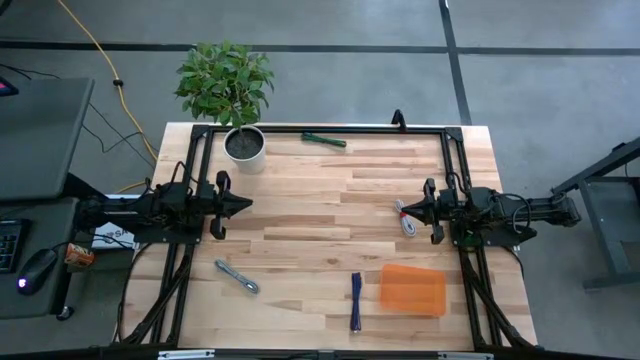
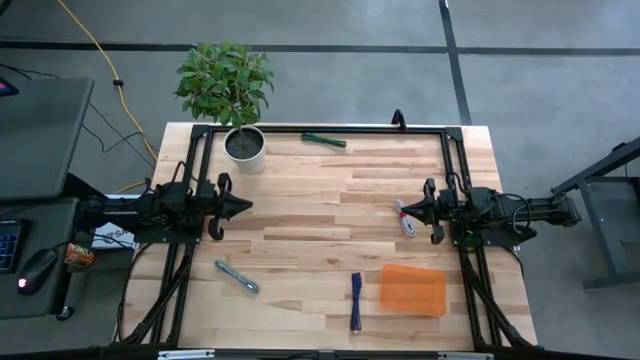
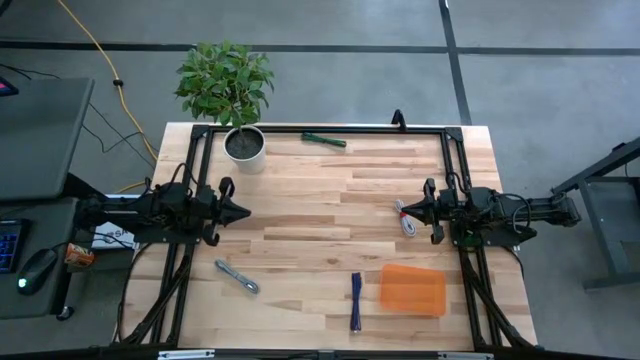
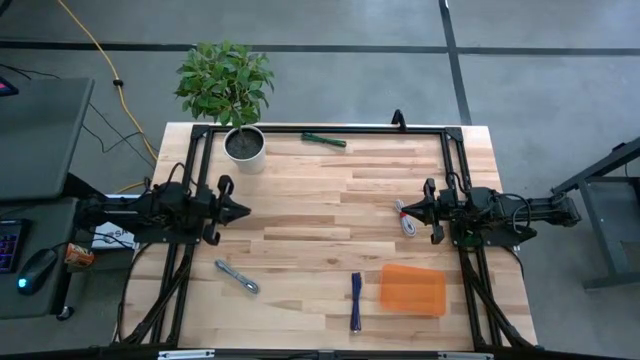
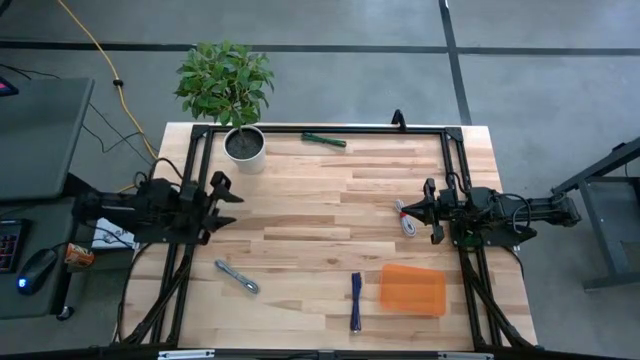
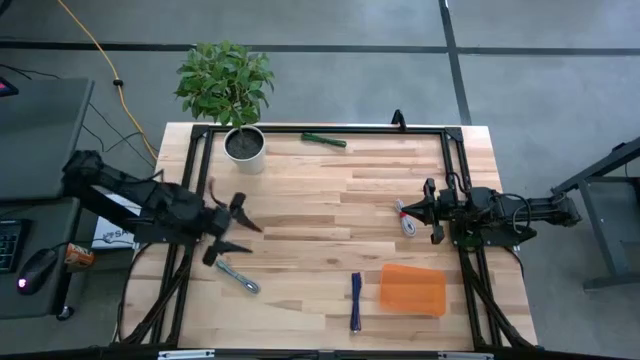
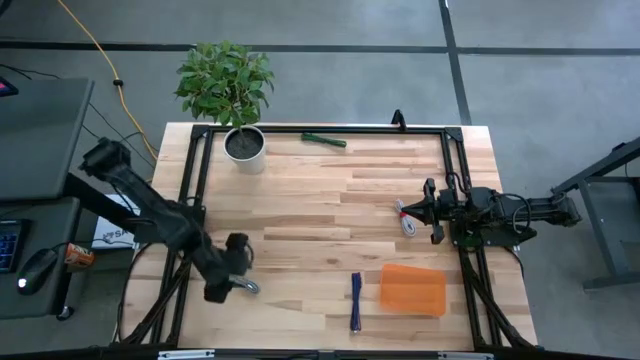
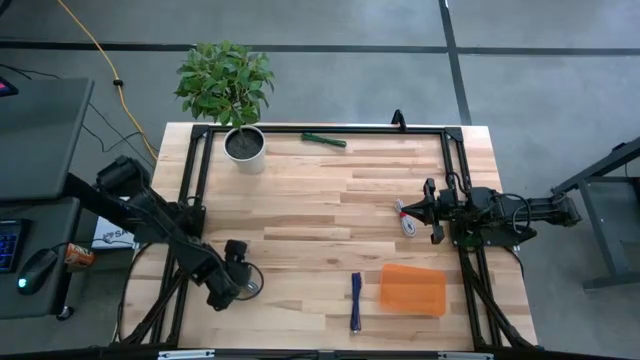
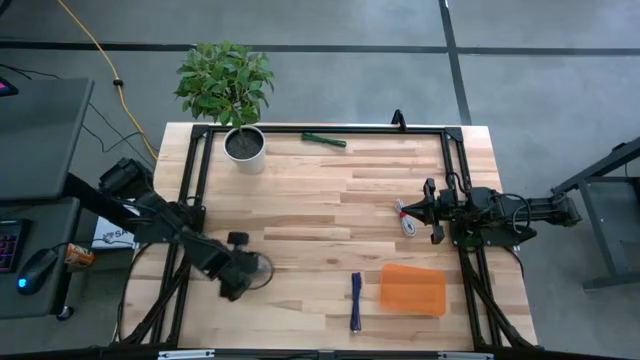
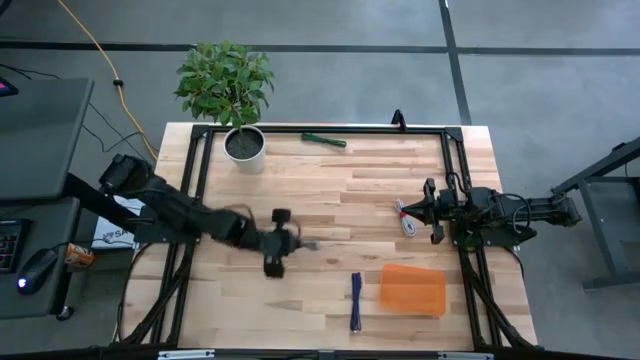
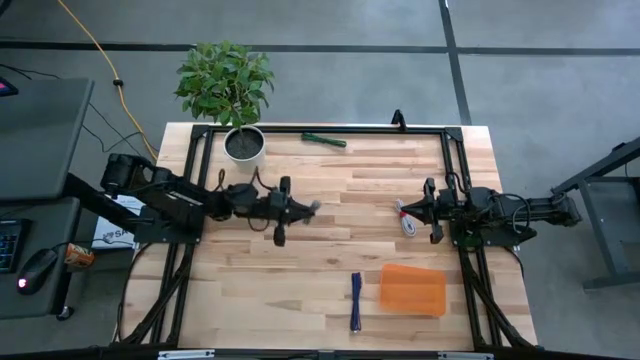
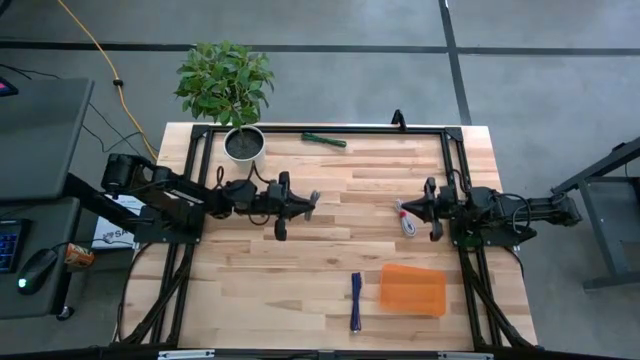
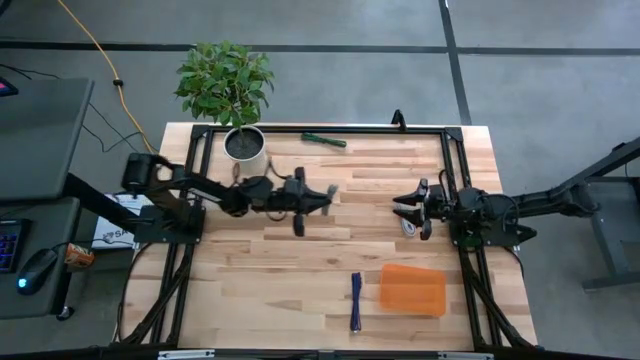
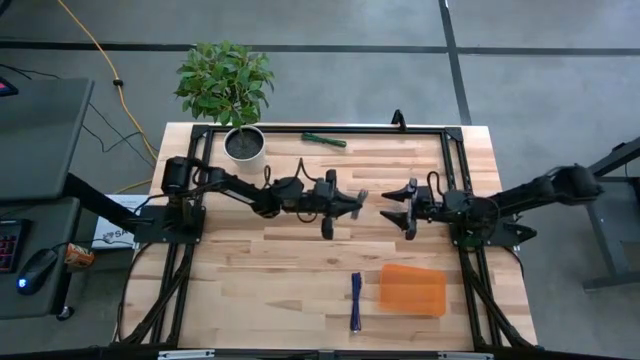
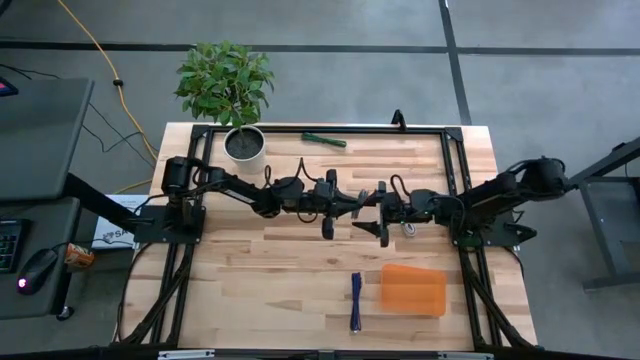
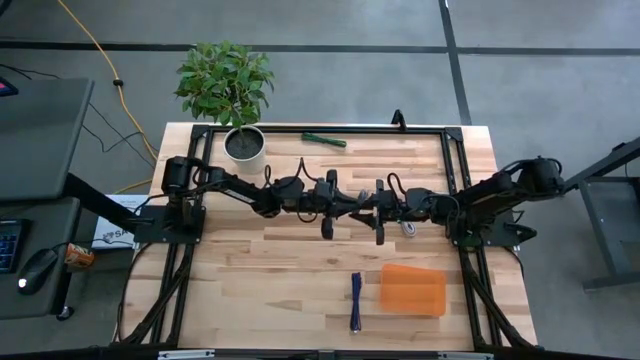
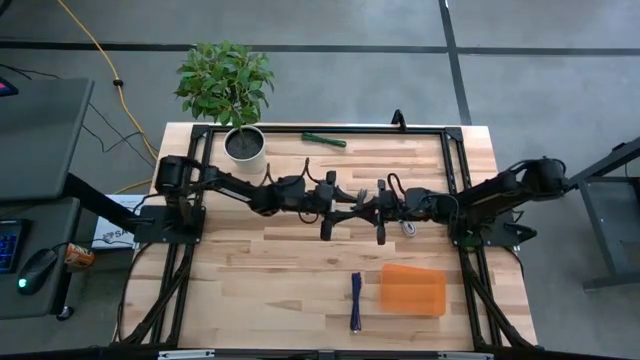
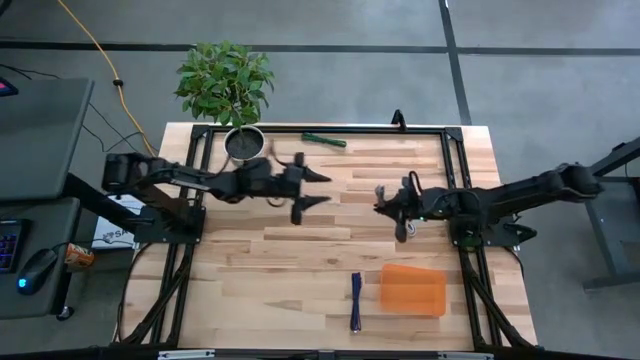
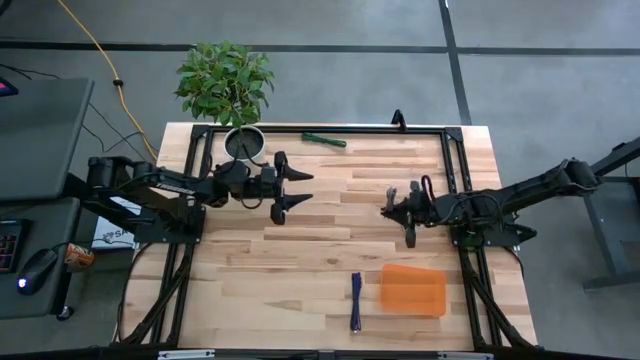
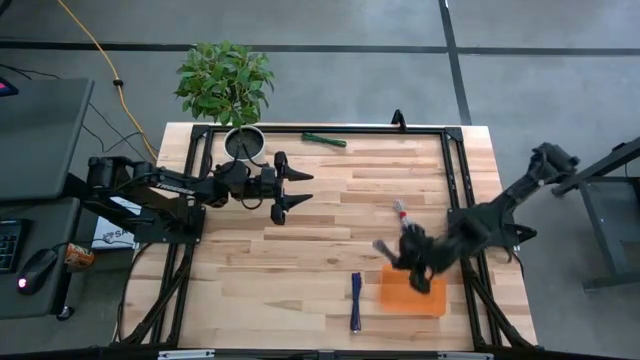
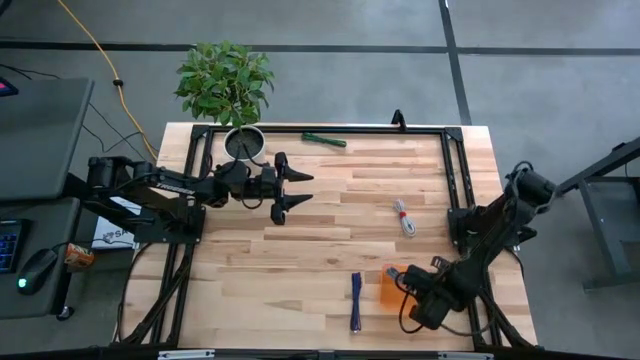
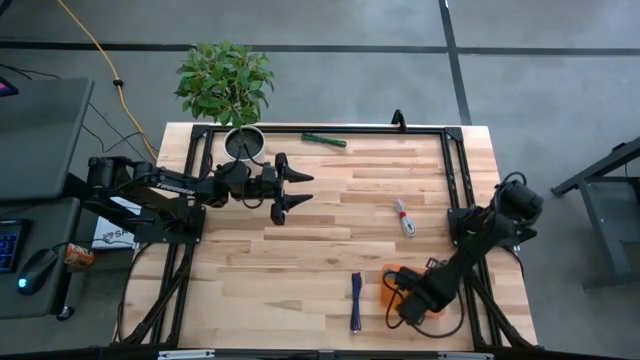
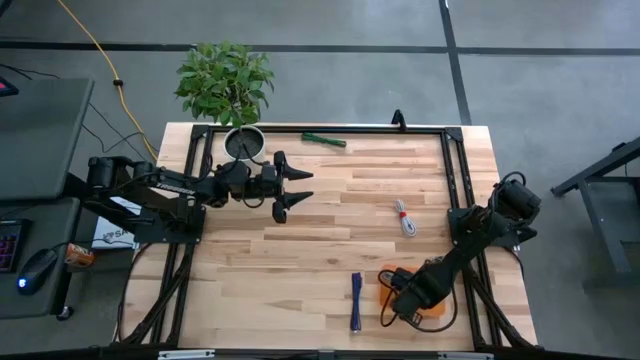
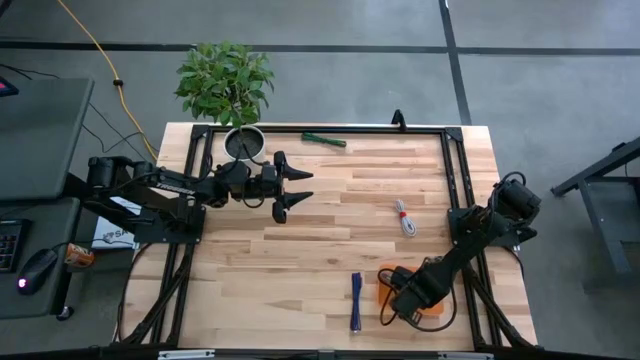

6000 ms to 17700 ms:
Task: Pick and place USB-C Cables
Put the black charger cable into the orange bin

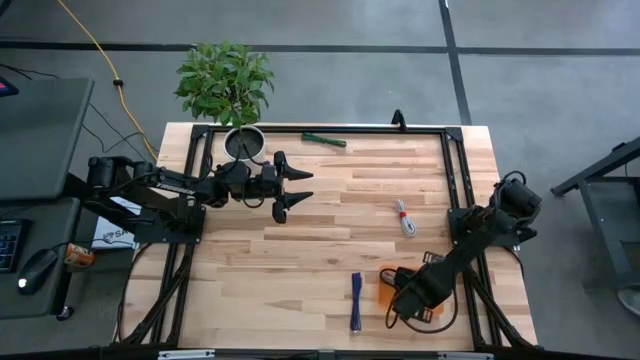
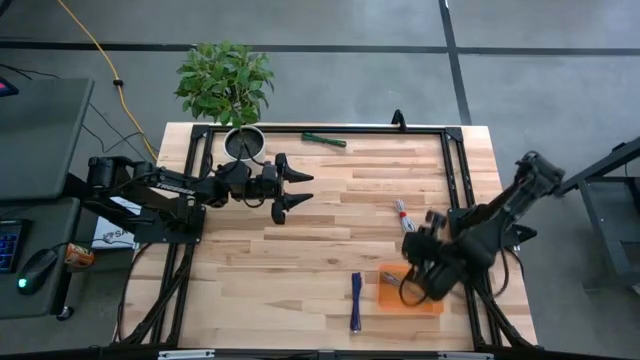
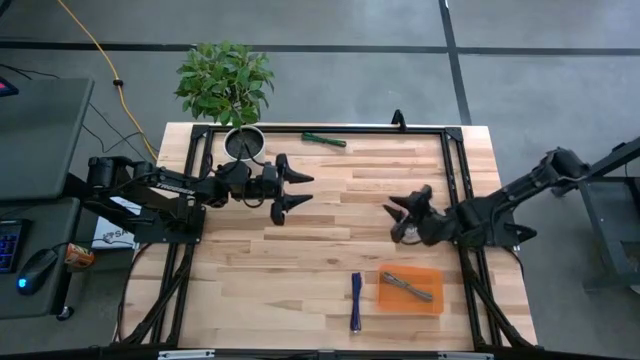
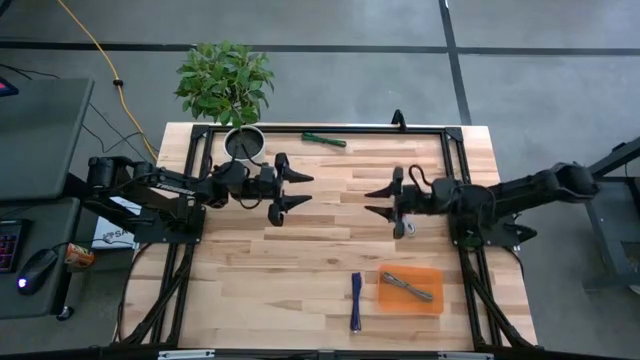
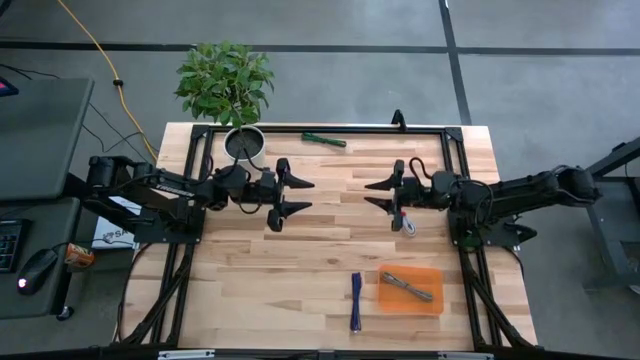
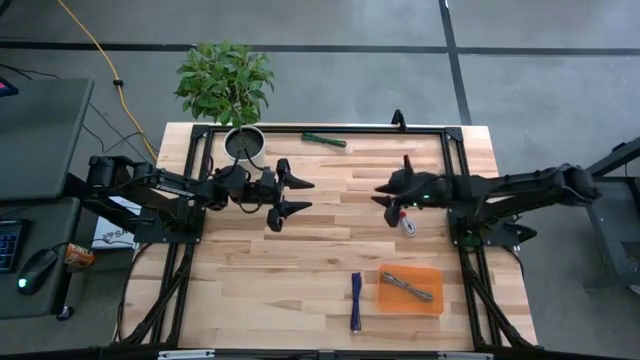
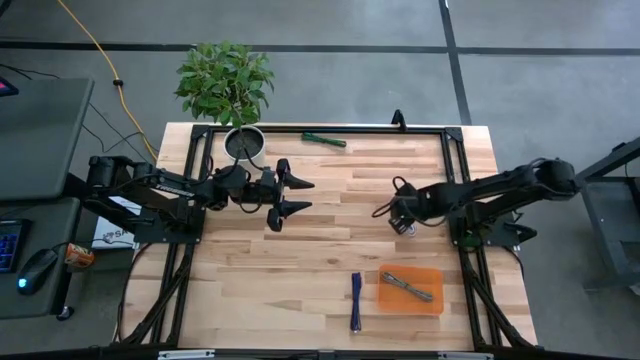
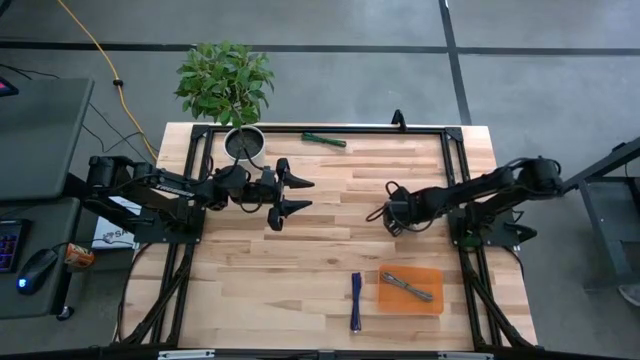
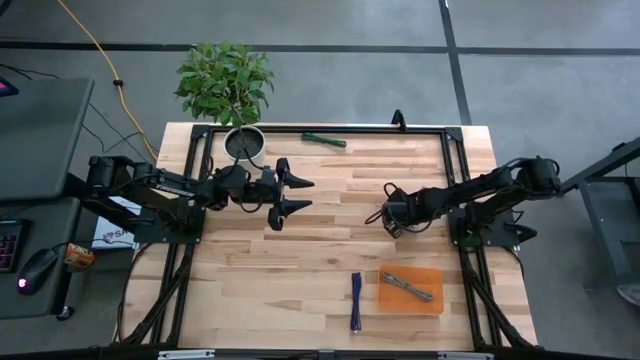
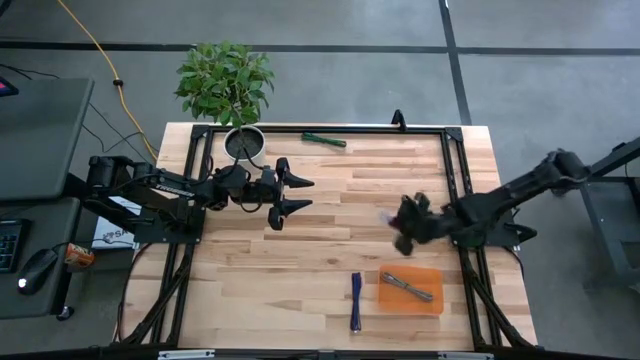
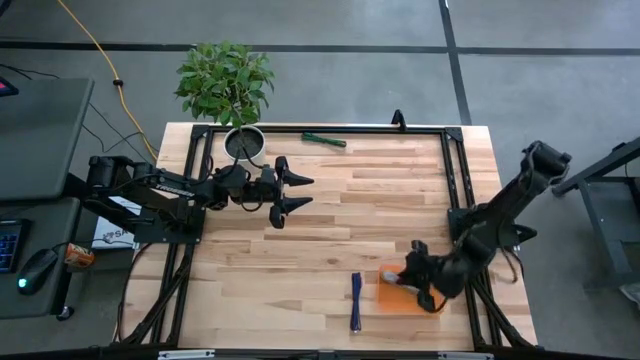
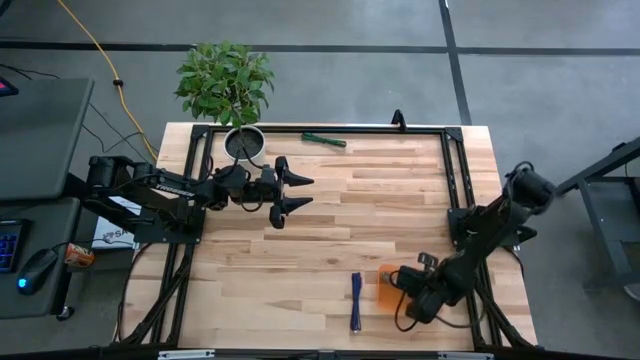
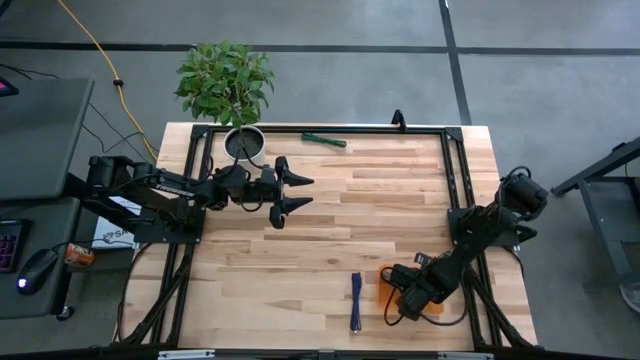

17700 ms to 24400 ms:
Put the white charger cable into the orange bin

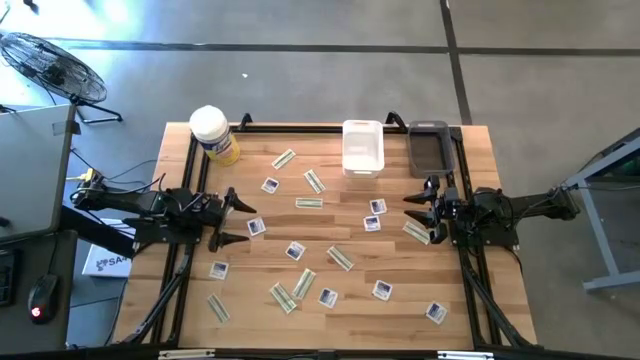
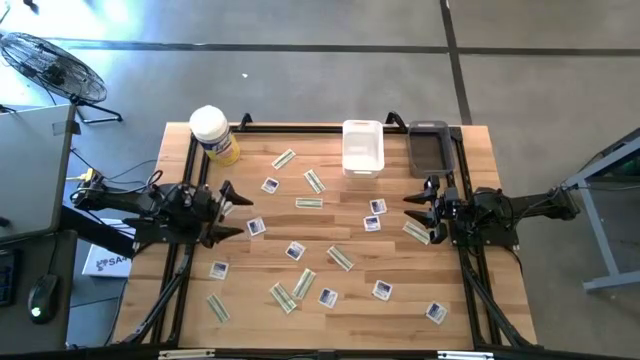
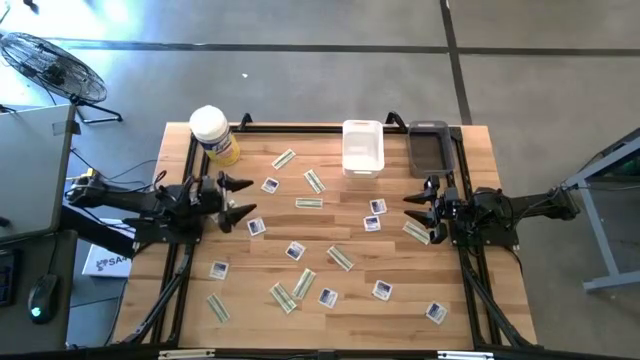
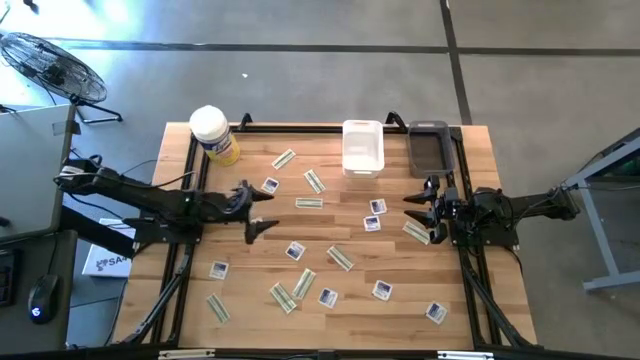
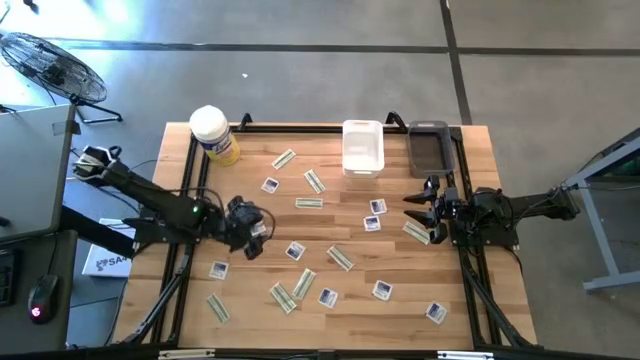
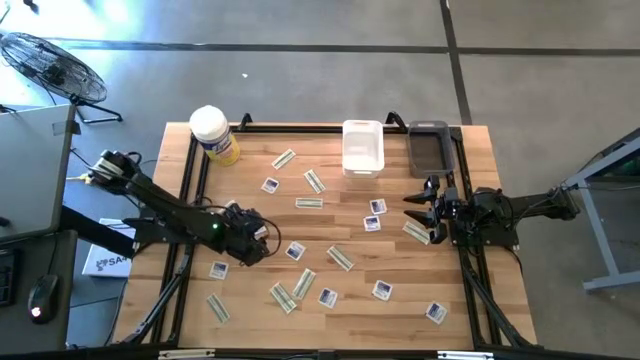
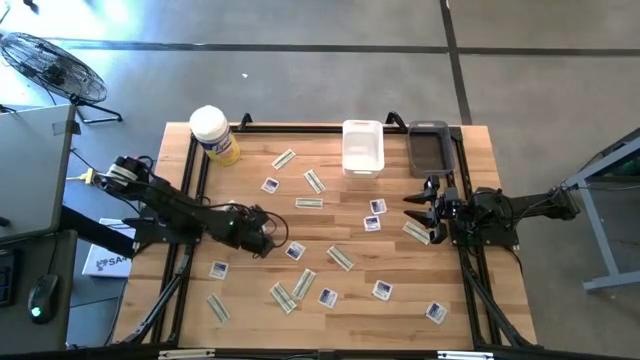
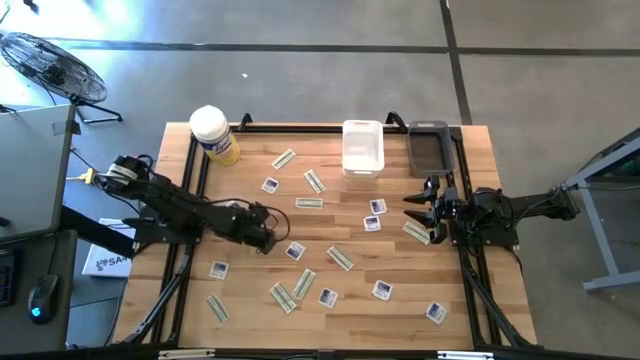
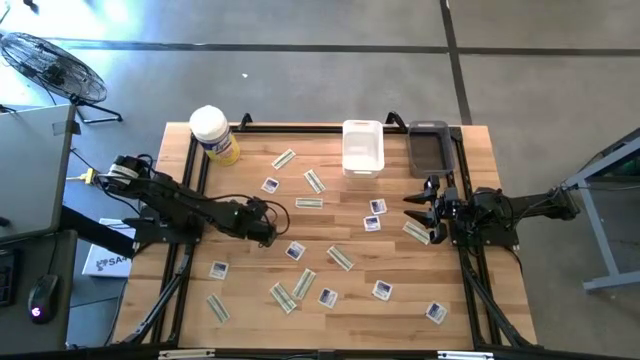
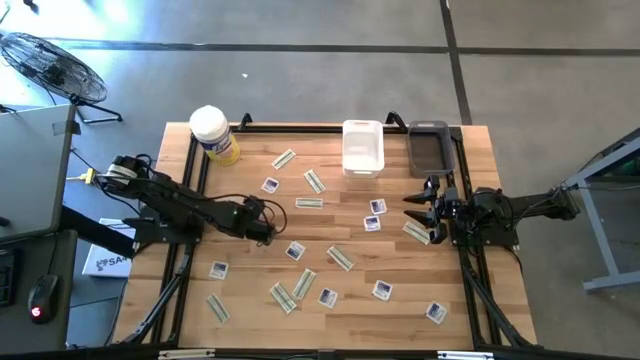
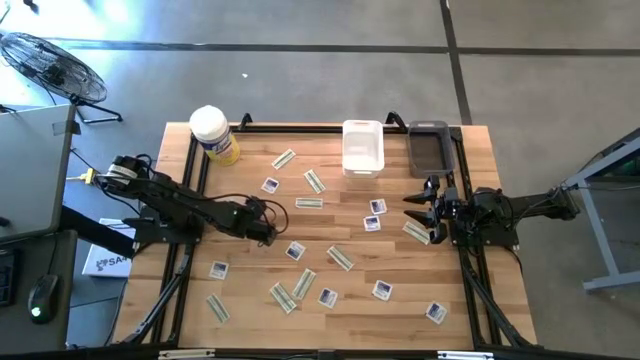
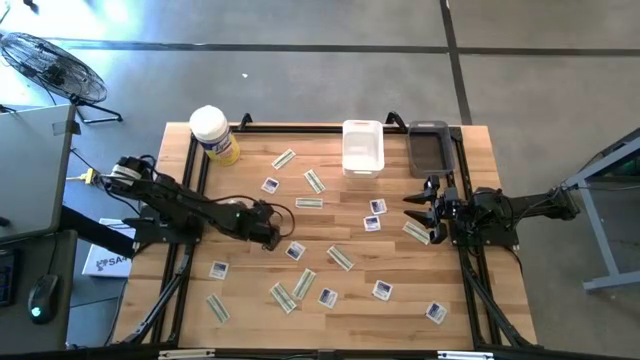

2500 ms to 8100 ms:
Task: Pick & Place First Aid Supplies
Put the blue alcohol pad into the white bin
